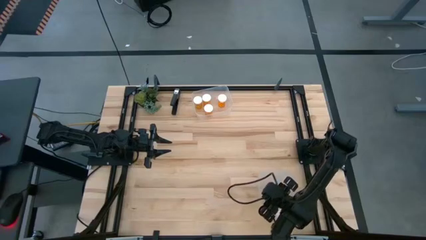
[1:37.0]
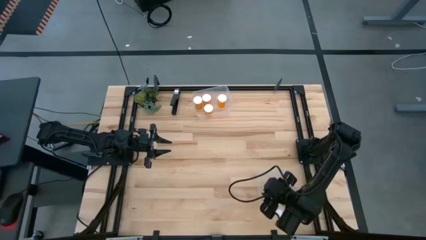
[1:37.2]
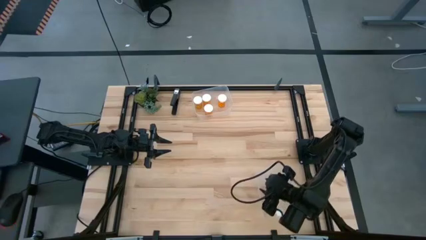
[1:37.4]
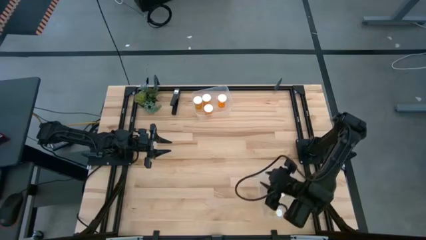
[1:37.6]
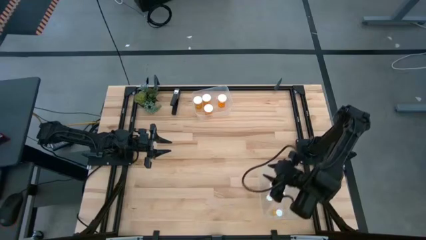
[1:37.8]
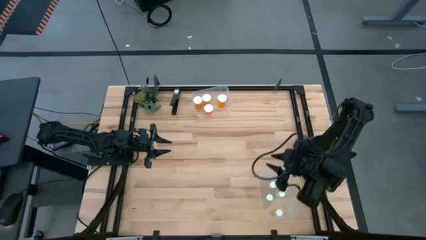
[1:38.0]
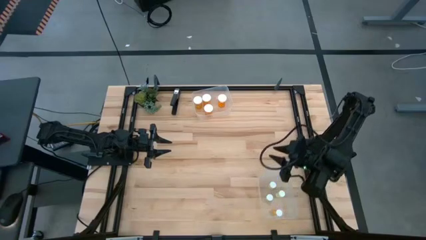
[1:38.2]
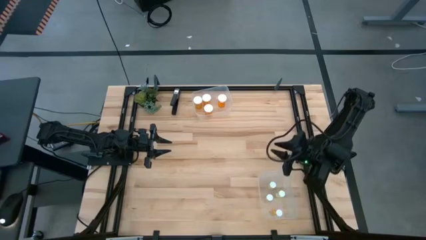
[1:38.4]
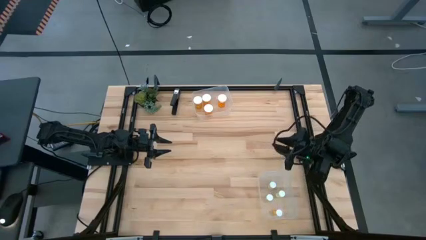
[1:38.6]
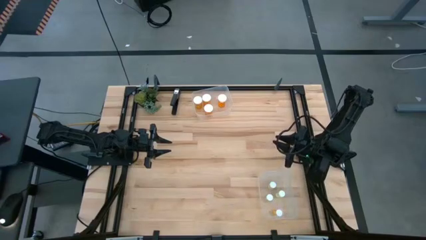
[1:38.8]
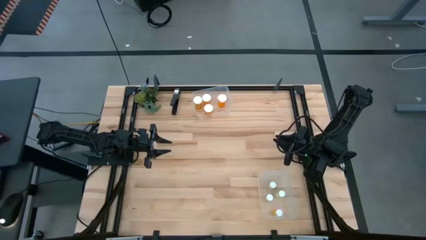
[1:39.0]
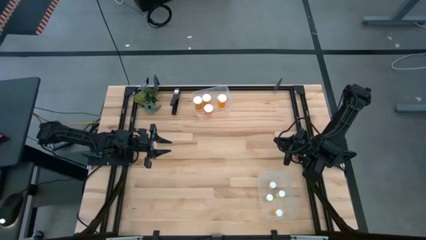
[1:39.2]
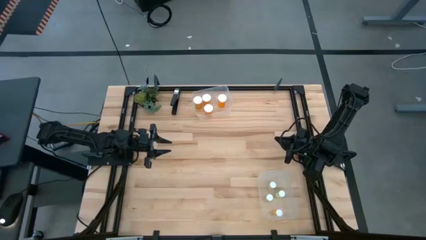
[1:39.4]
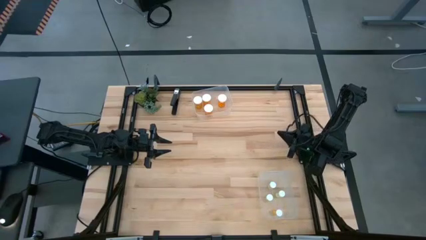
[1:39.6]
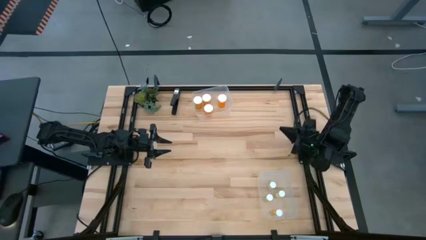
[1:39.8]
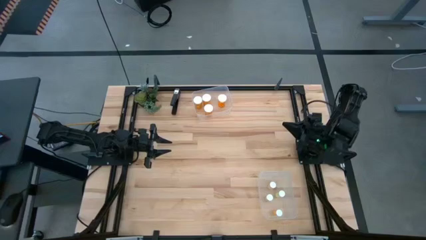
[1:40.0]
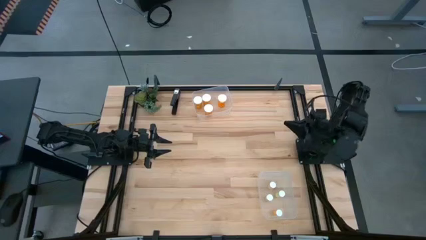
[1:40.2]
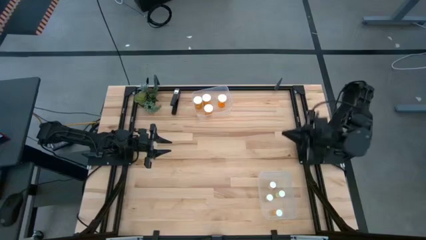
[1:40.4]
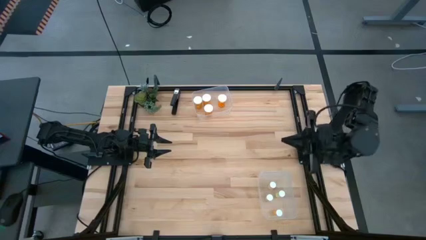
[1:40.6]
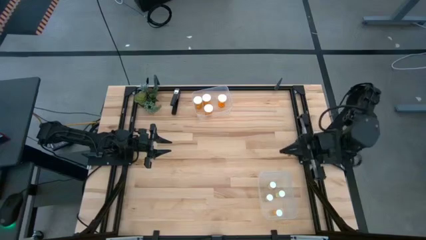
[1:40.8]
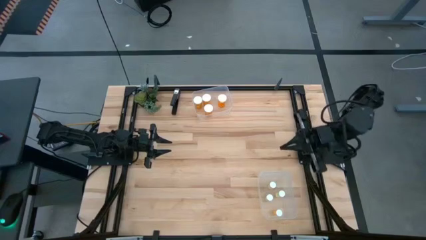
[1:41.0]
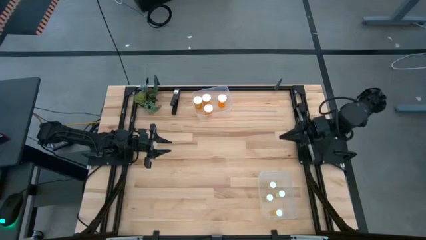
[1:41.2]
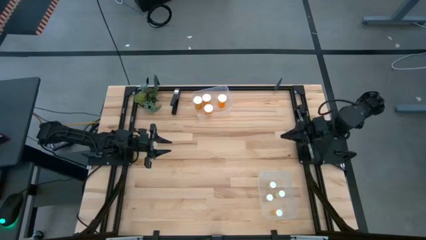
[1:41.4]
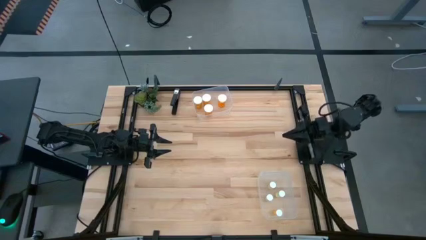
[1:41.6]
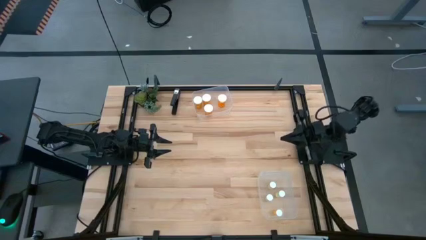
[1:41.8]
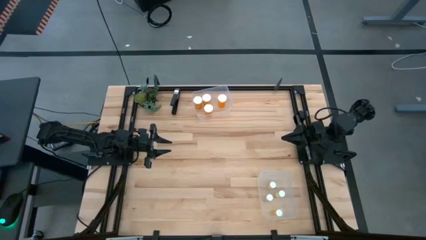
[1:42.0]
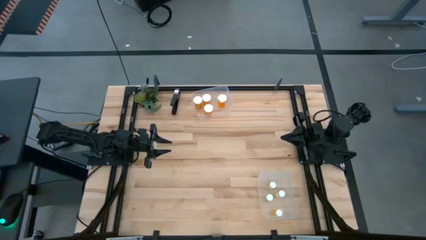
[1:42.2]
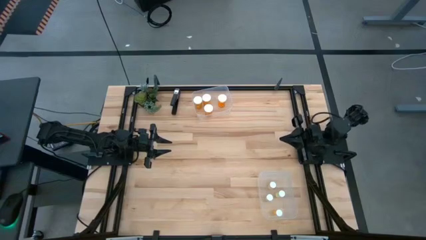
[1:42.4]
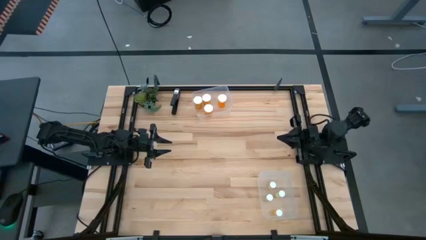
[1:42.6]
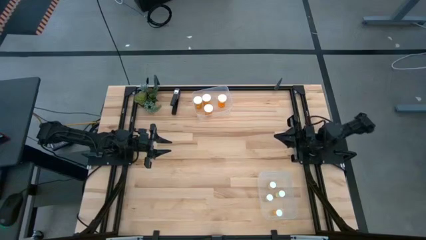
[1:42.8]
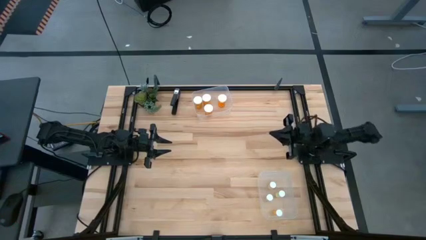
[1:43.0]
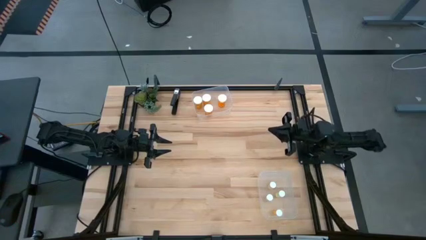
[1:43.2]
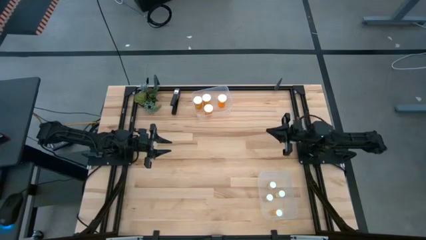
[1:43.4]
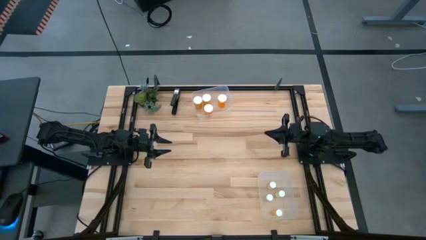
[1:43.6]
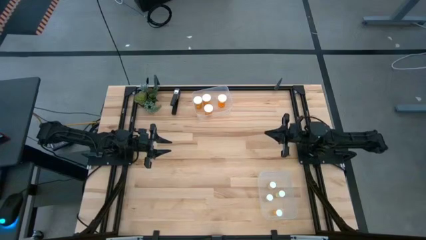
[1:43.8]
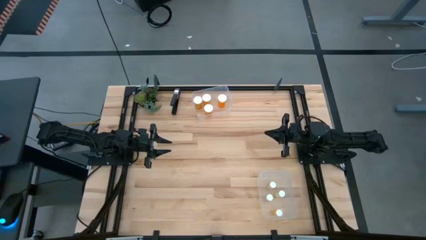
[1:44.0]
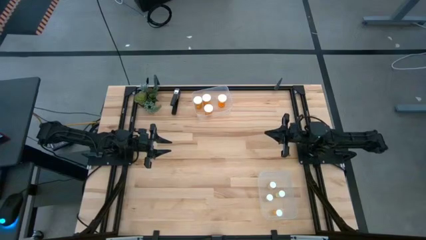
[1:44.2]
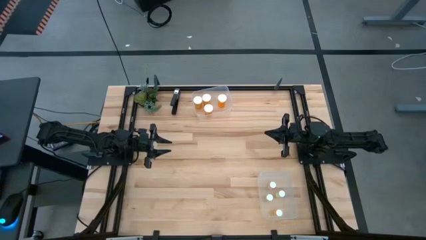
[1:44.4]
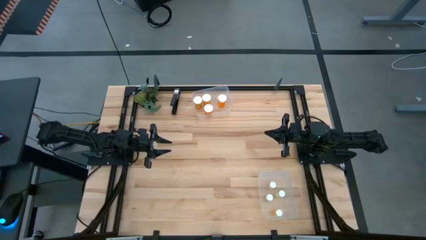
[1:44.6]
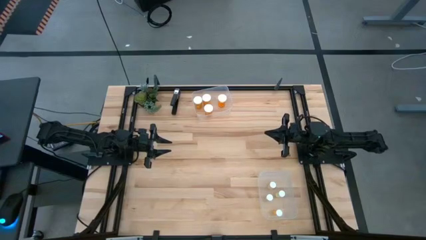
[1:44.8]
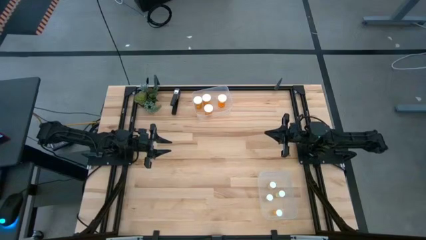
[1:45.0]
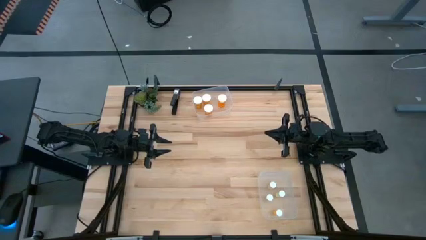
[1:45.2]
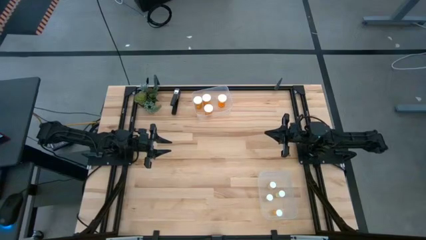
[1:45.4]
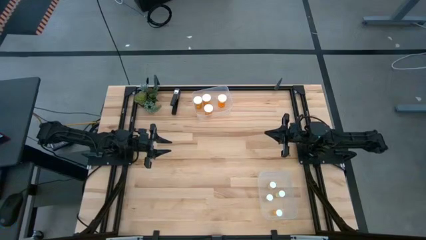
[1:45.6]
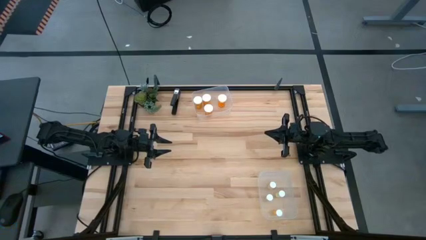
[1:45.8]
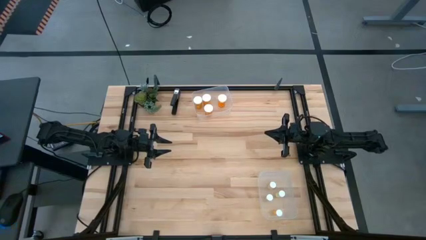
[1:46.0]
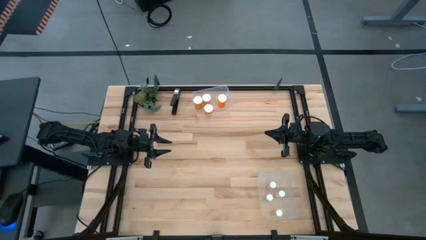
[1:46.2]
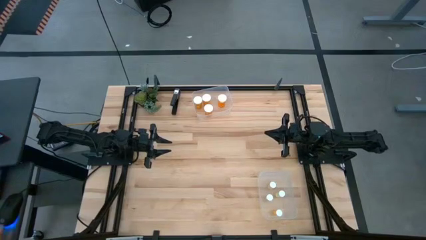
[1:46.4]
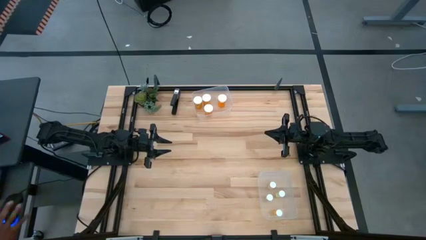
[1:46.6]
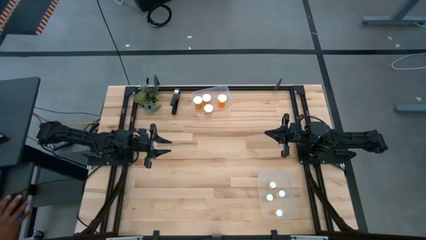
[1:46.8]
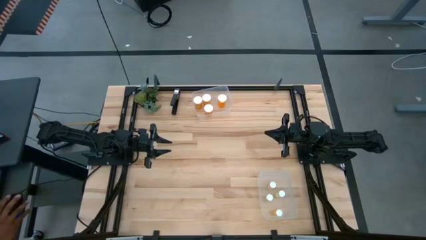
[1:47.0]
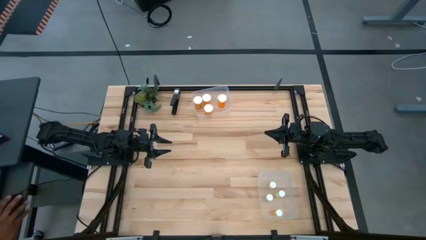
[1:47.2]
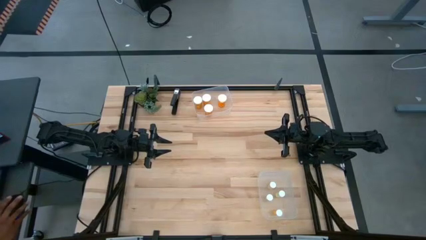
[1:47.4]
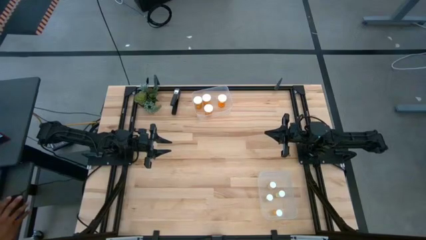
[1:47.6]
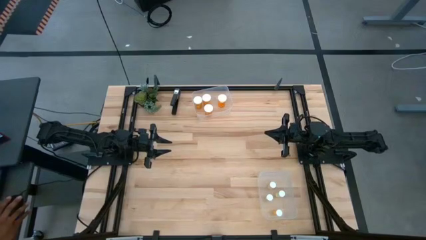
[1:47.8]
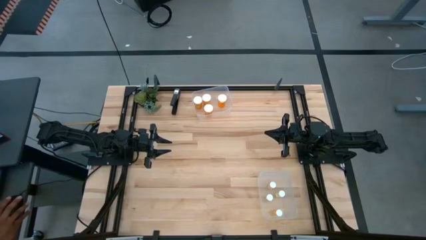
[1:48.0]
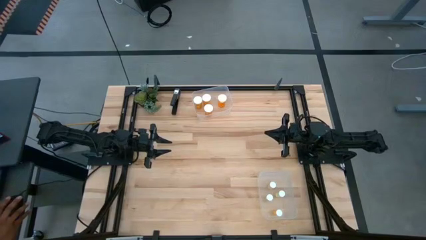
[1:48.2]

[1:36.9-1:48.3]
Task: Pick and place medicine bottles into bin by pill shape (circle, oval)
Return to Home Position
